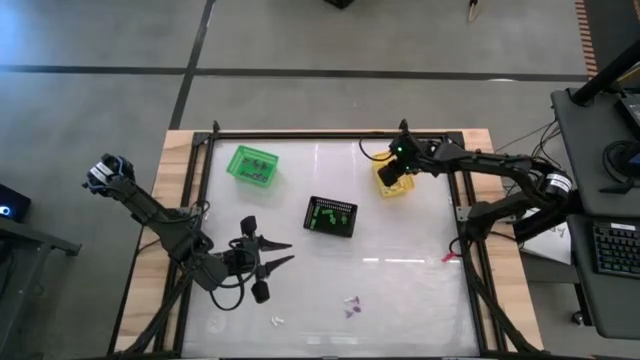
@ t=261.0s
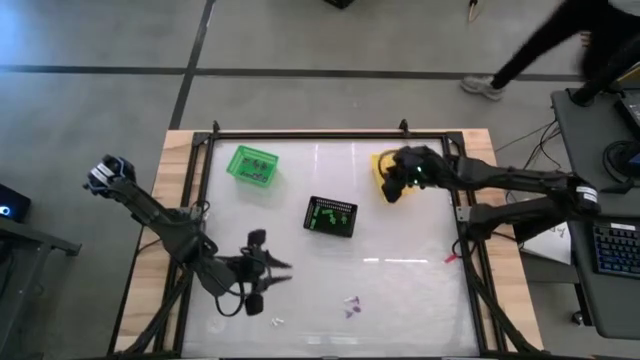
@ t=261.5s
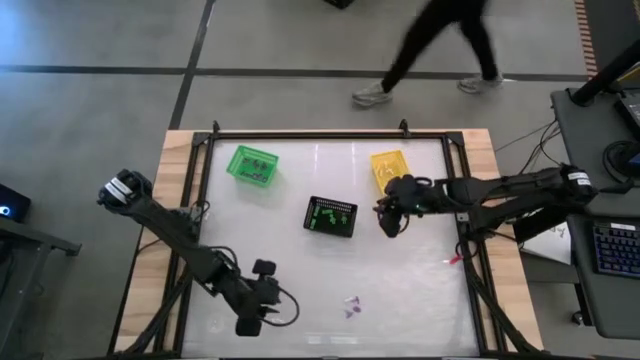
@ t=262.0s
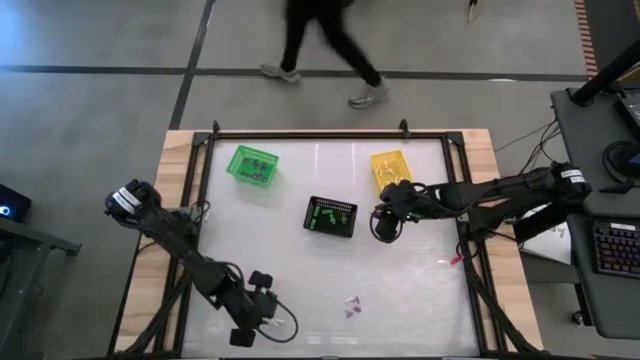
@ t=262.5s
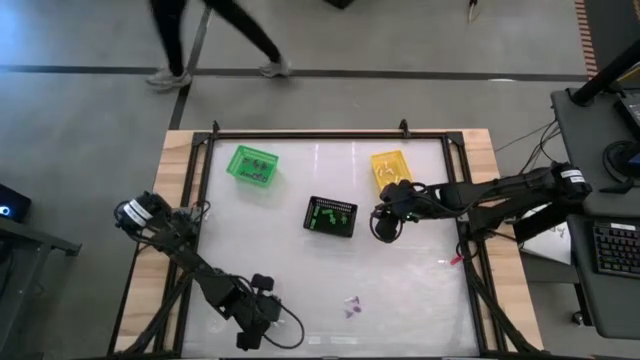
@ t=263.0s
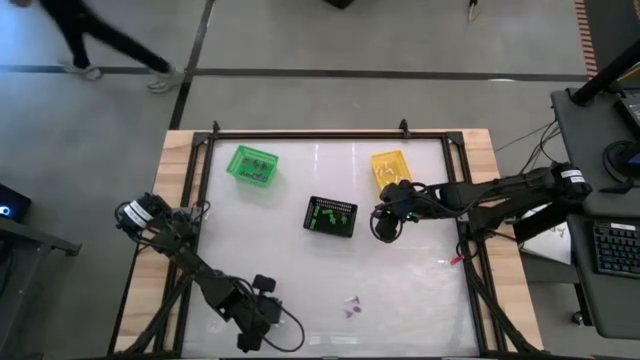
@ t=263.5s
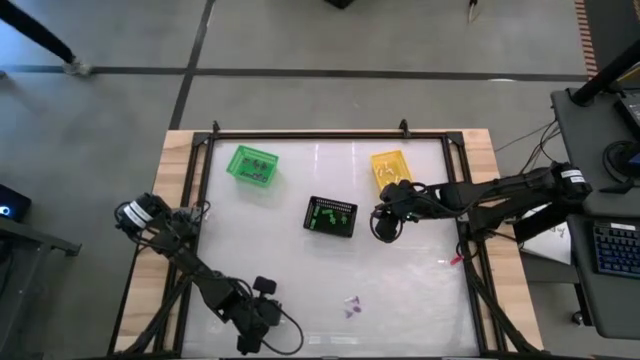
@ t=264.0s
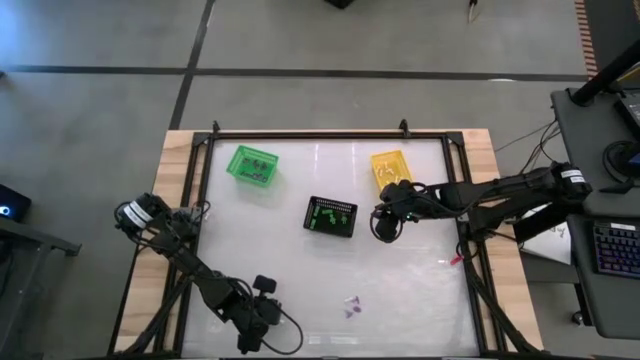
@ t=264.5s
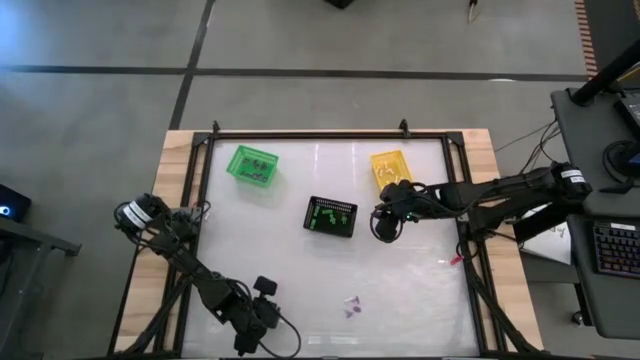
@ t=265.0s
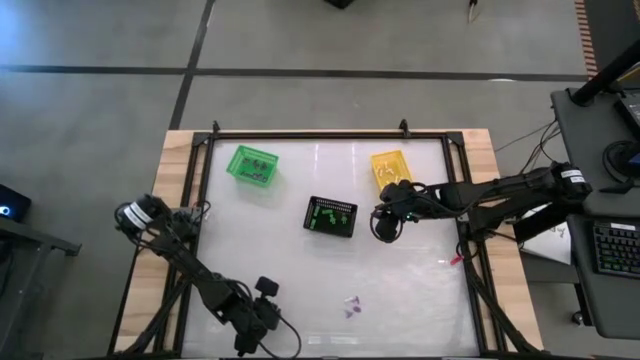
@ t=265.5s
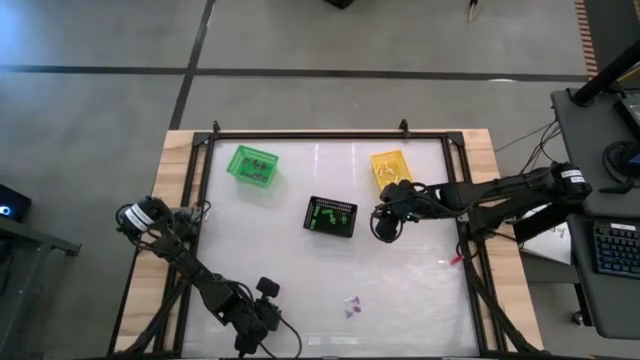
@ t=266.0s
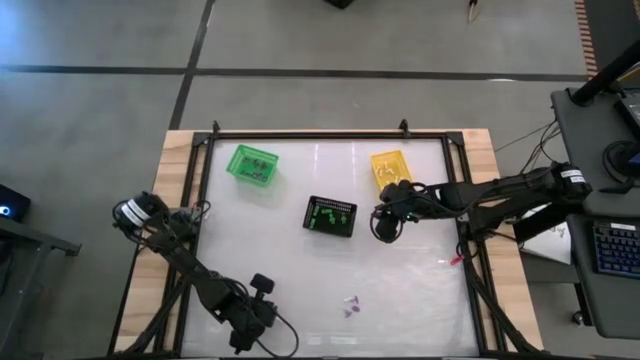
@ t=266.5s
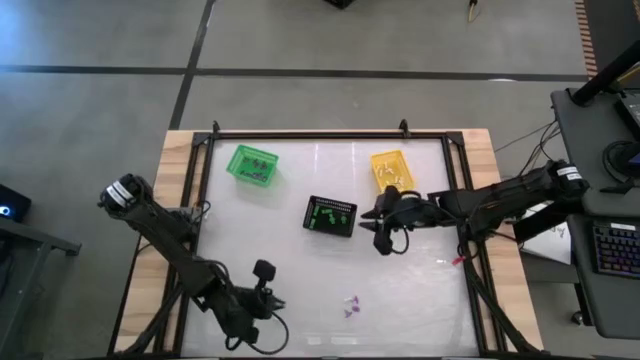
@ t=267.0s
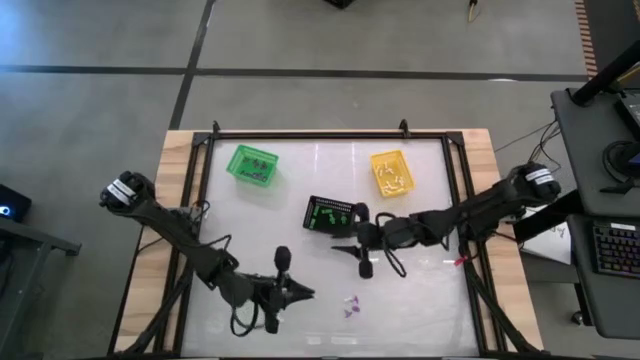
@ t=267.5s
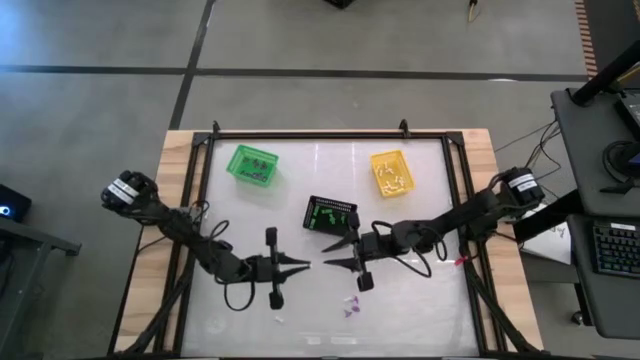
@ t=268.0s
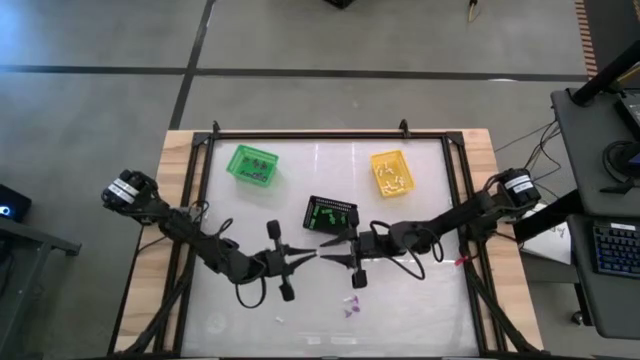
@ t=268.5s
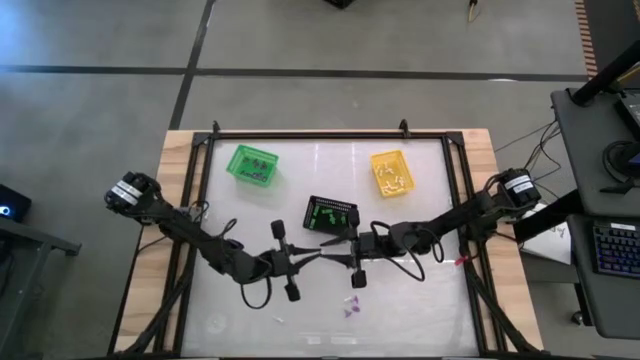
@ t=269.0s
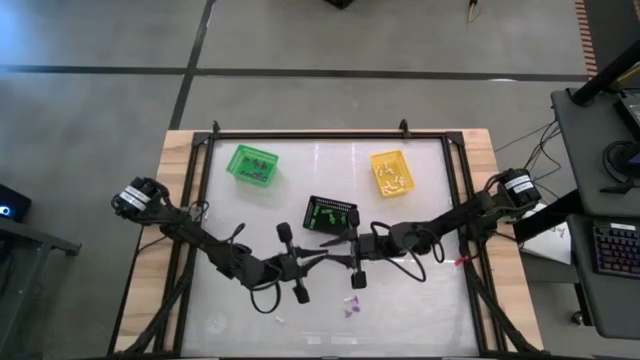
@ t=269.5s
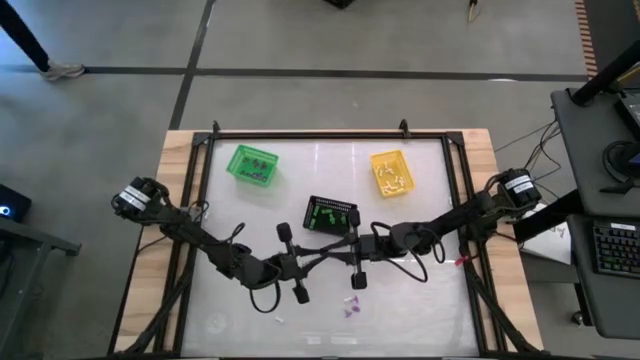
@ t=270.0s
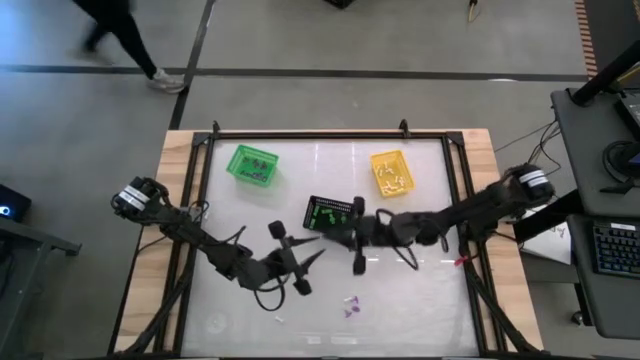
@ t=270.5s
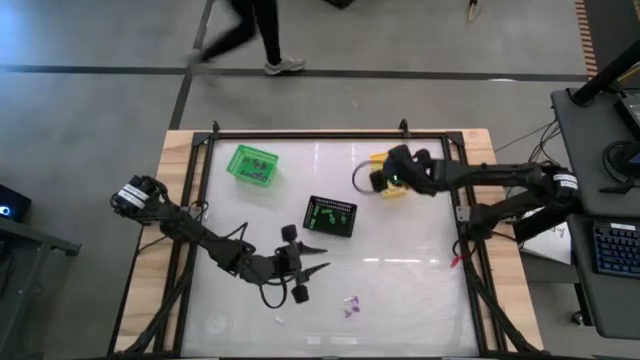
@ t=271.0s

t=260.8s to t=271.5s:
Task: Sort Halloween decoration
Put the white bone toy into the yellow bin

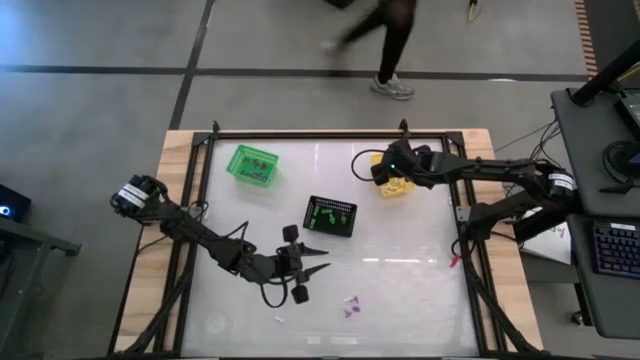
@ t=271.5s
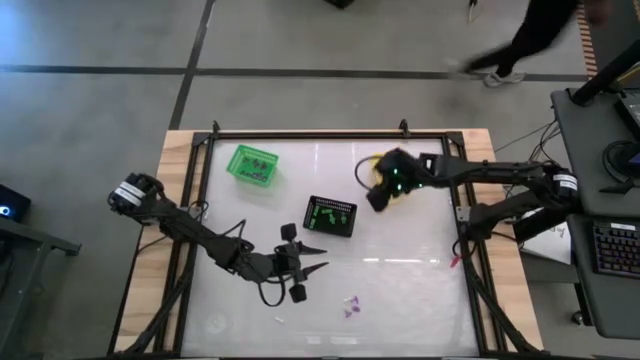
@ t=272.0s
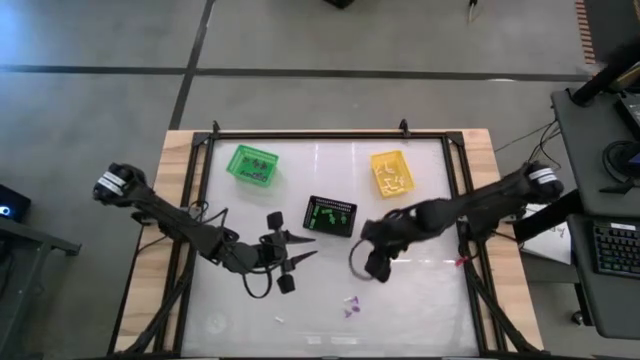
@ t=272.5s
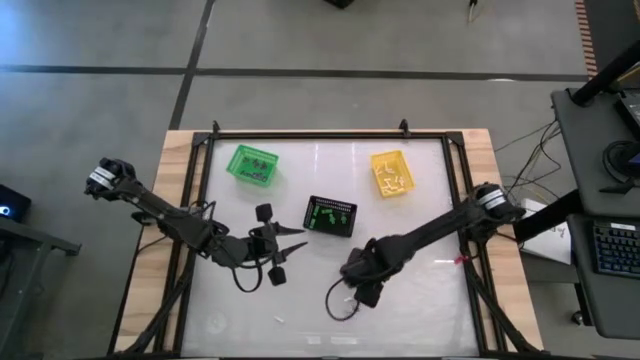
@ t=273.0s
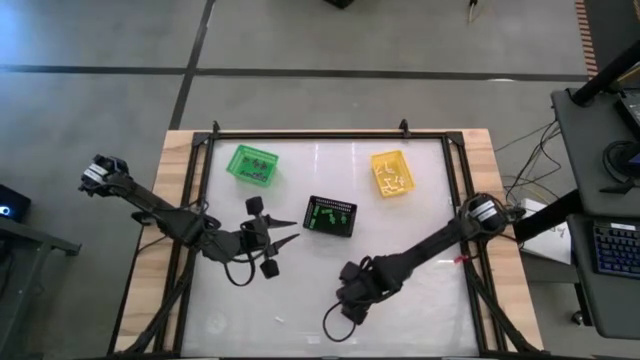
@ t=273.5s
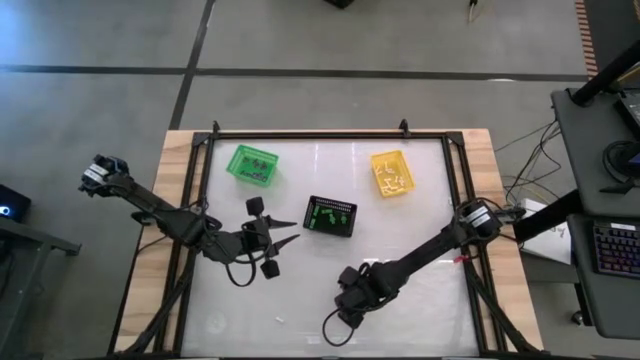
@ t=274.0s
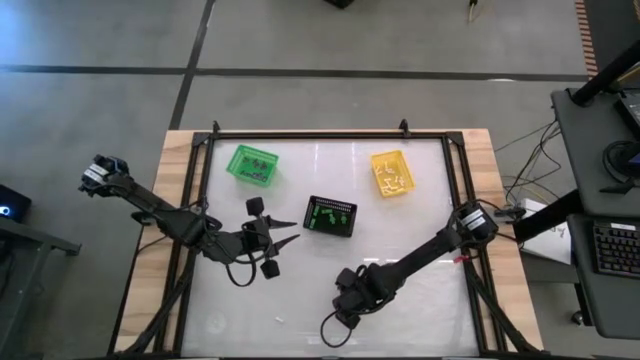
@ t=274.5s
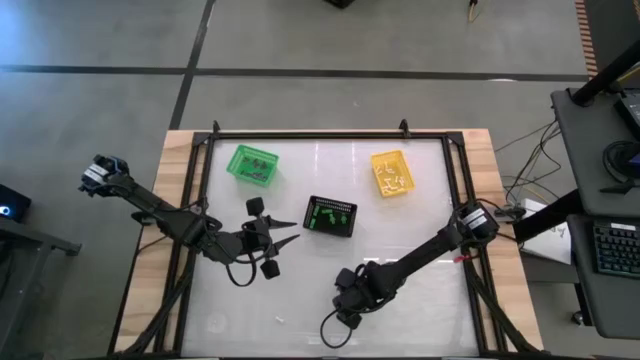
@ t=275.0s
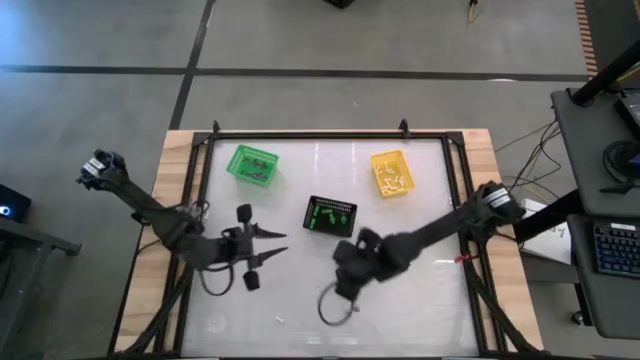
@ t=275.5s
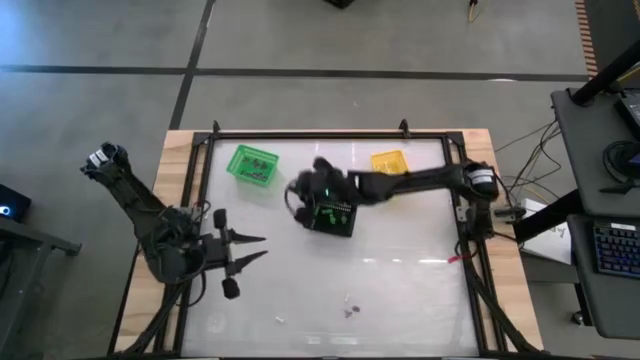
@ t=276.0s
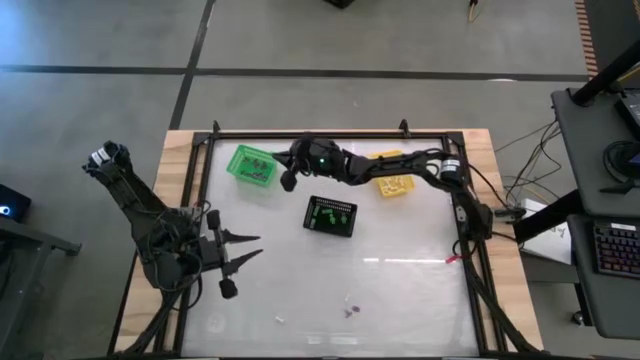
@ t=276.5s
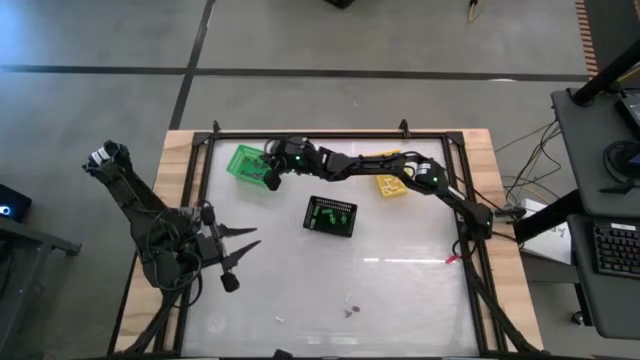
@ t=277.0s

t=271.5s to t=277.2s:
Put the purple witch hat toy into the green bin

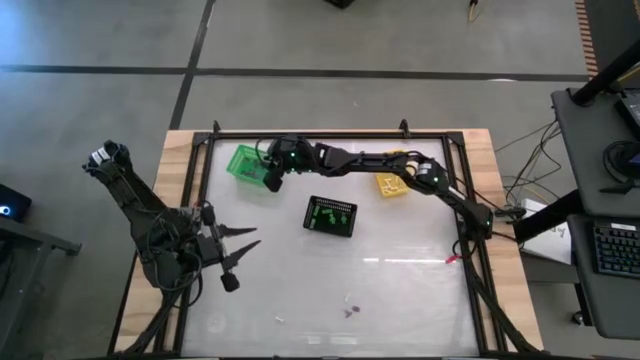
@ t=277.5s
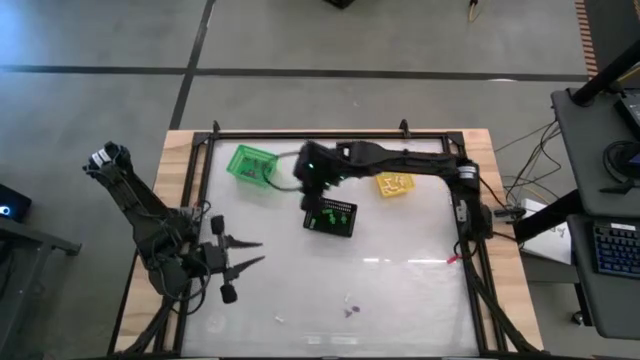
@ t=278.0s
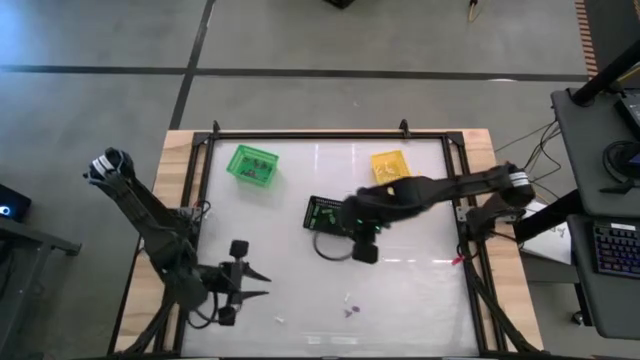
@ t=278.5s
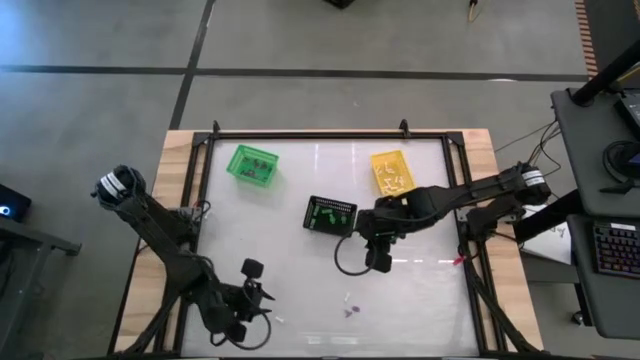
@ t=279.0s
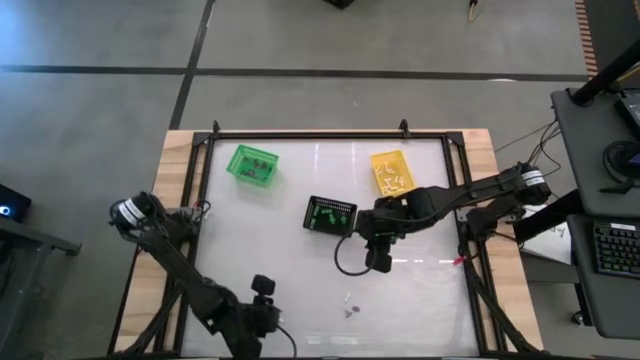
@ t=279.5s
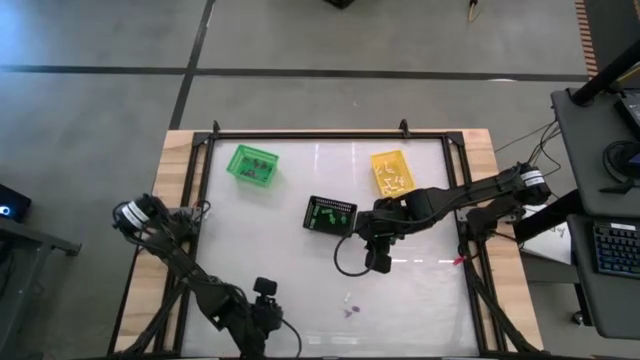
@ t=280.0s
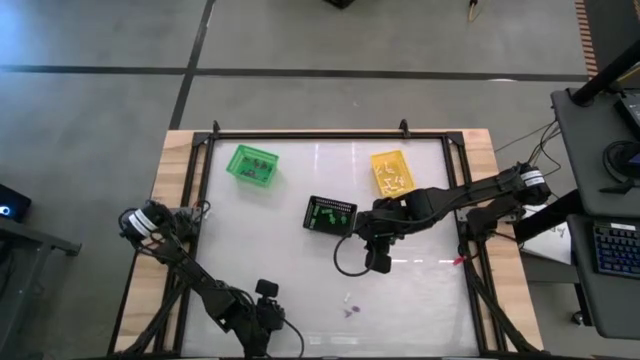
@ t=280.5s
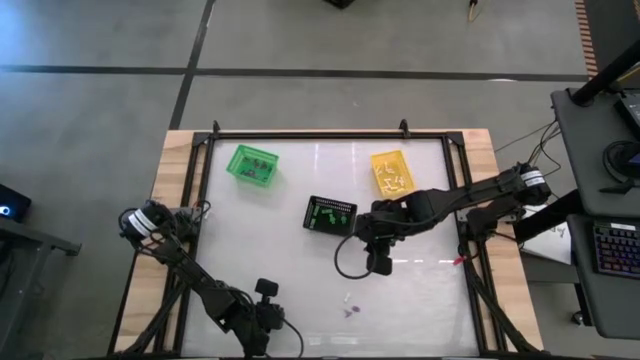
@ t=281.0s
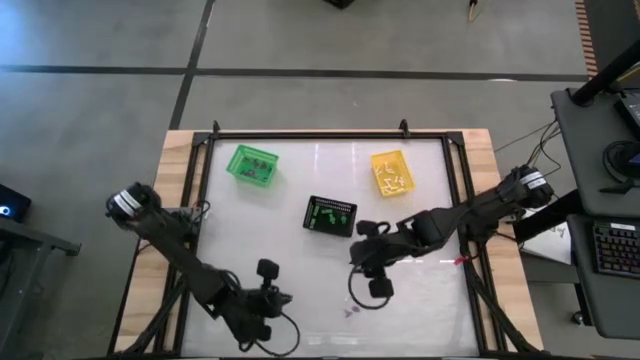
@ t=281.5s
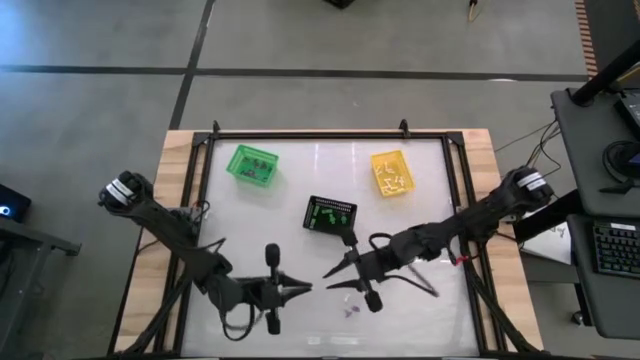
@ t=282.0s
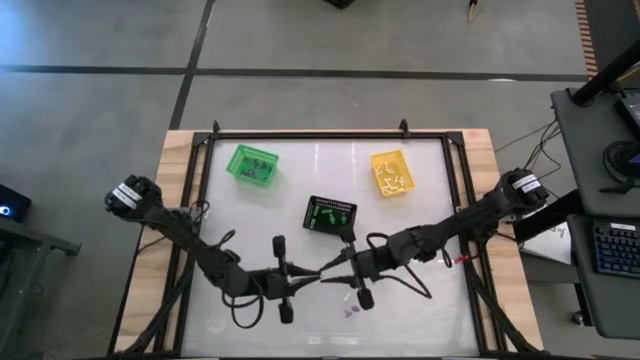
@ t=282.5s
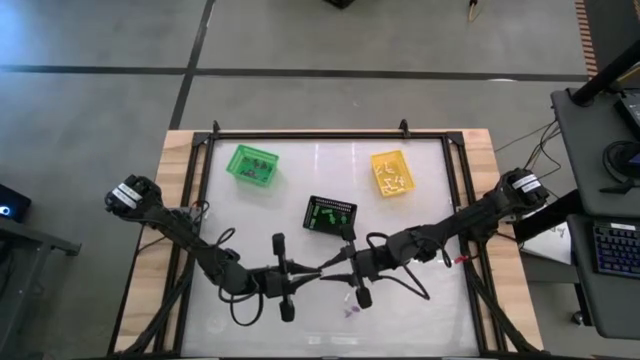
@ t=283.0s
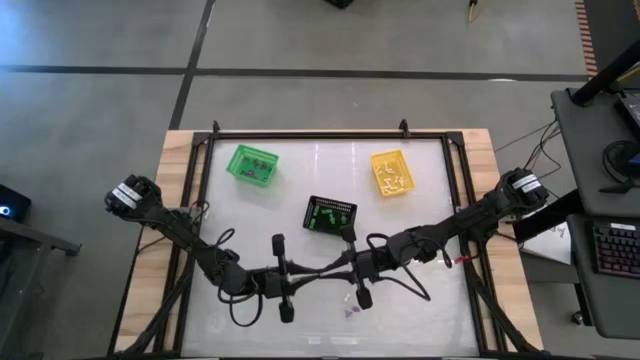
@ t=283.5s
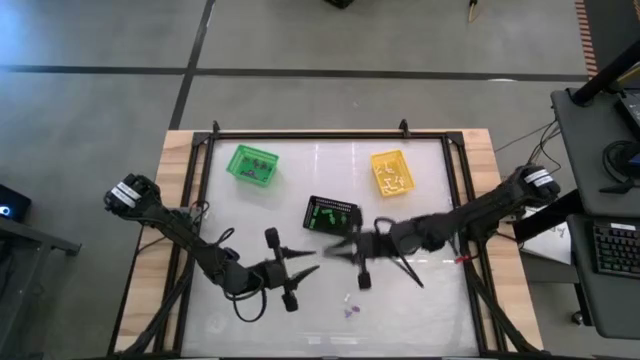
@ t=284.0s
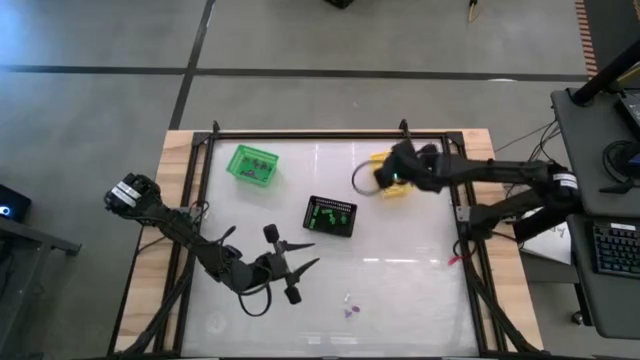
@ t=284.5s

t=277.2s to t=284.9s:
Put the white bone toy into the yellow bin
